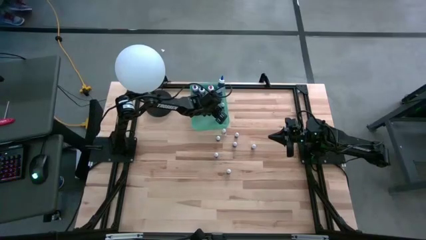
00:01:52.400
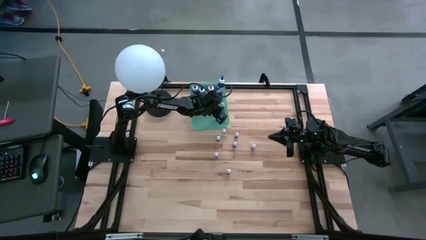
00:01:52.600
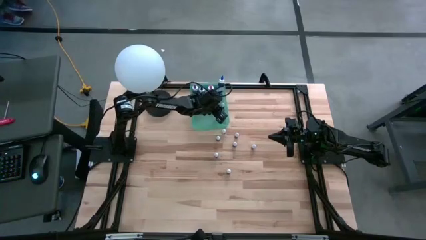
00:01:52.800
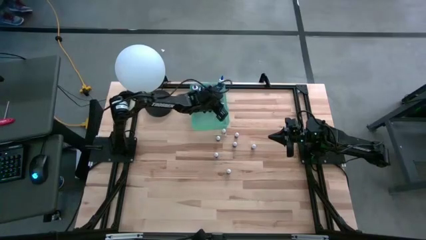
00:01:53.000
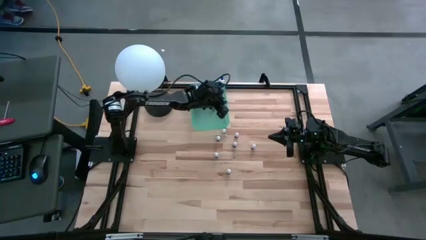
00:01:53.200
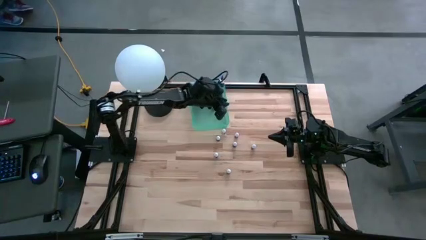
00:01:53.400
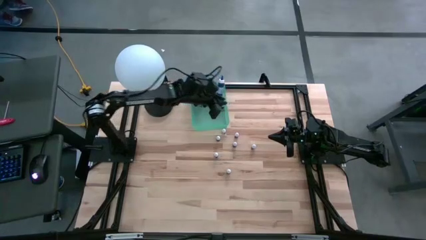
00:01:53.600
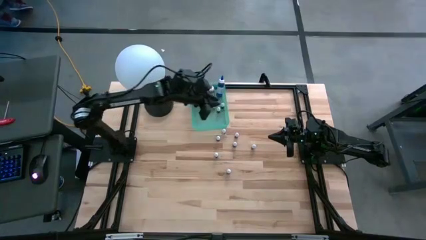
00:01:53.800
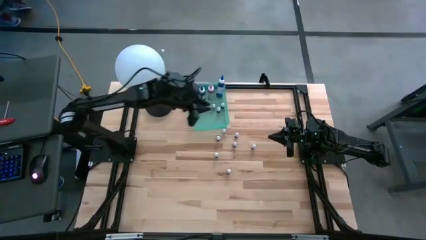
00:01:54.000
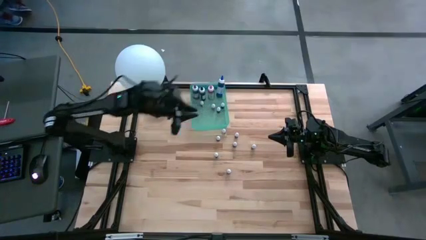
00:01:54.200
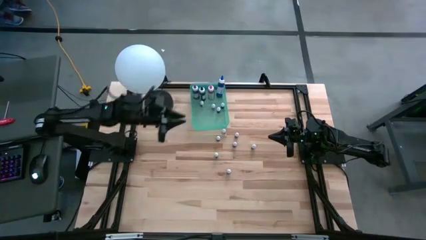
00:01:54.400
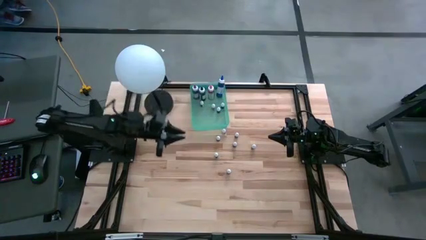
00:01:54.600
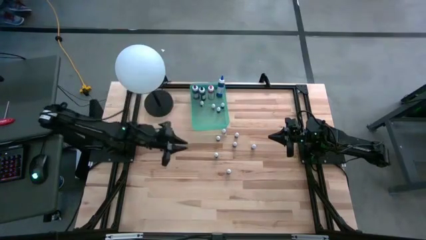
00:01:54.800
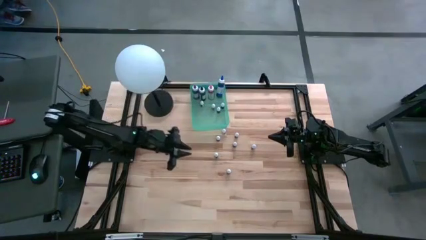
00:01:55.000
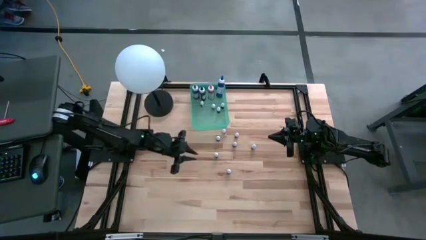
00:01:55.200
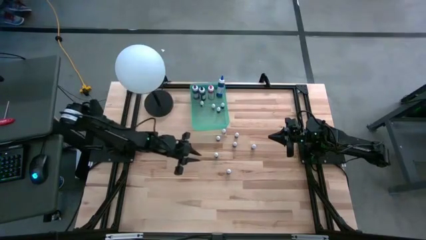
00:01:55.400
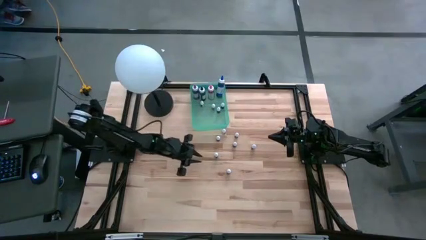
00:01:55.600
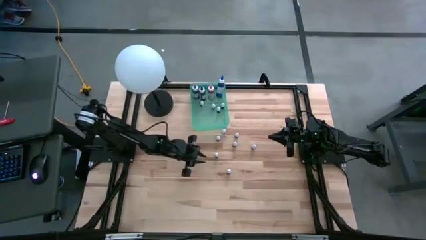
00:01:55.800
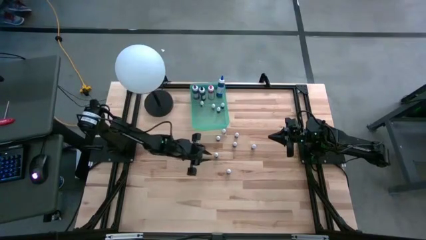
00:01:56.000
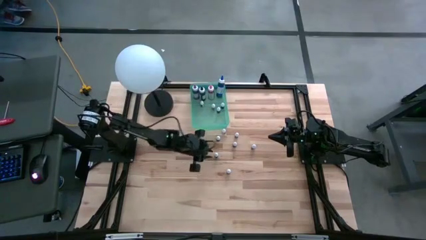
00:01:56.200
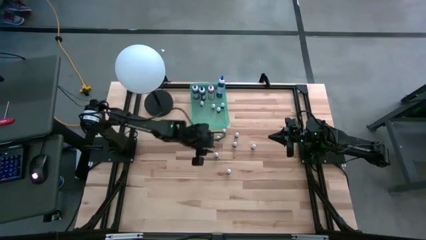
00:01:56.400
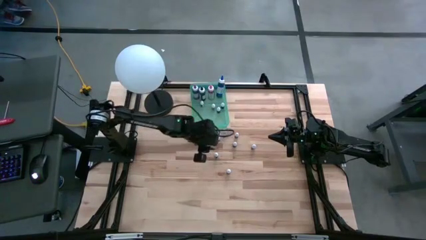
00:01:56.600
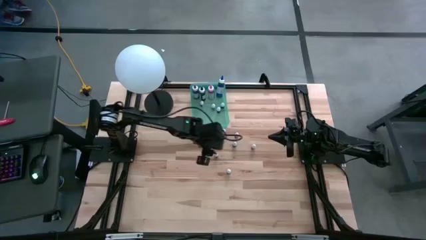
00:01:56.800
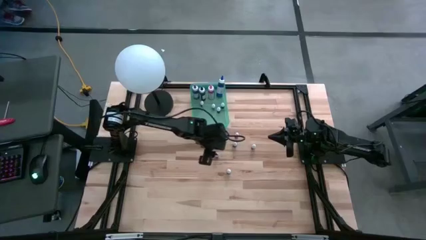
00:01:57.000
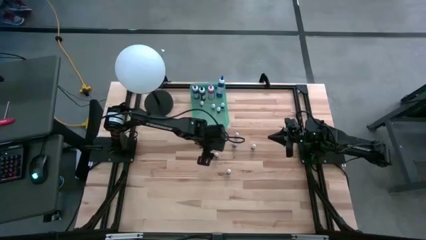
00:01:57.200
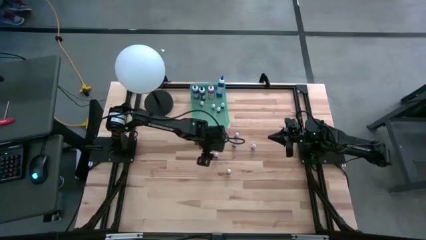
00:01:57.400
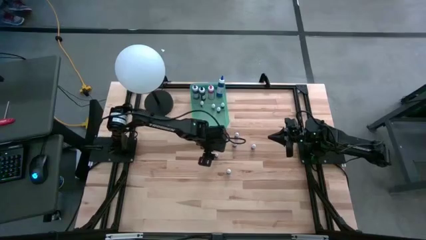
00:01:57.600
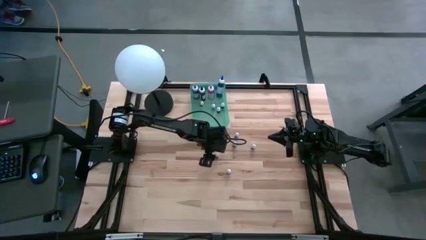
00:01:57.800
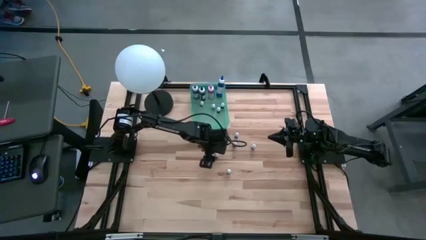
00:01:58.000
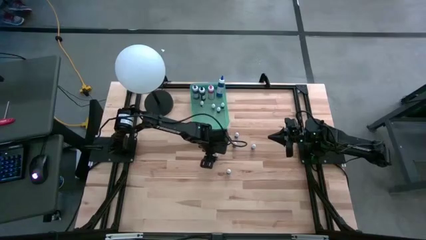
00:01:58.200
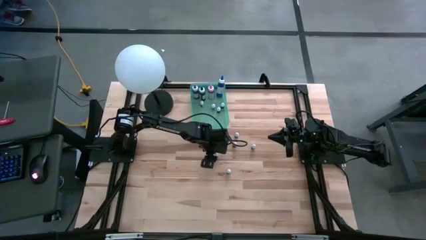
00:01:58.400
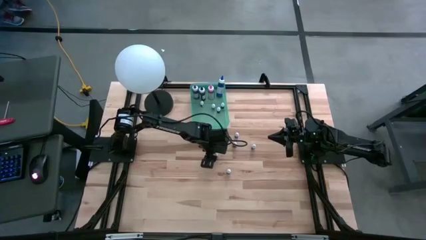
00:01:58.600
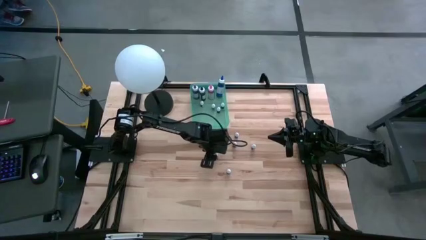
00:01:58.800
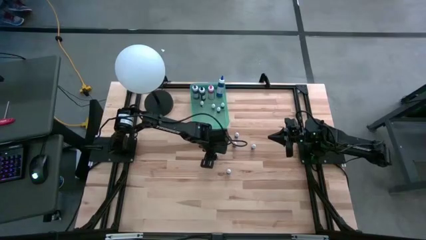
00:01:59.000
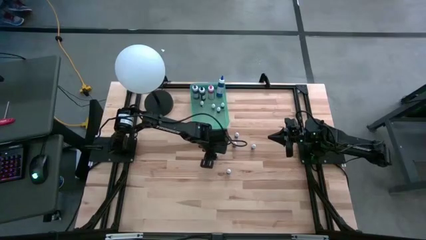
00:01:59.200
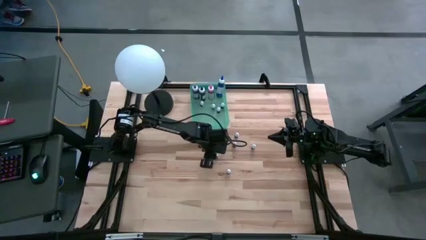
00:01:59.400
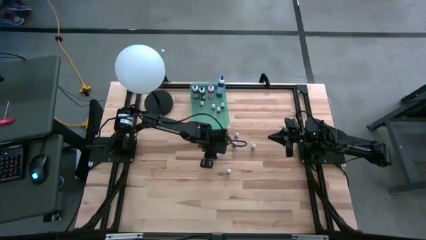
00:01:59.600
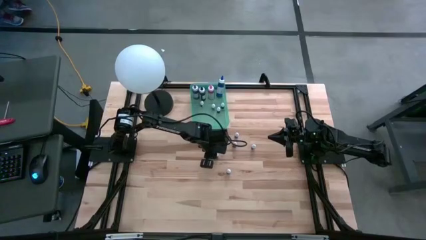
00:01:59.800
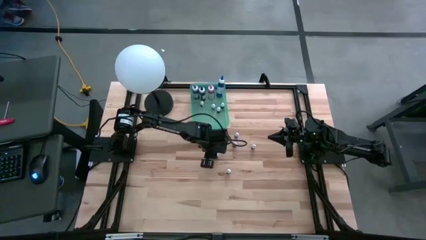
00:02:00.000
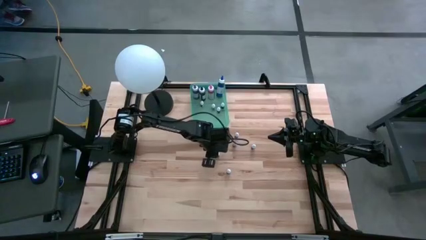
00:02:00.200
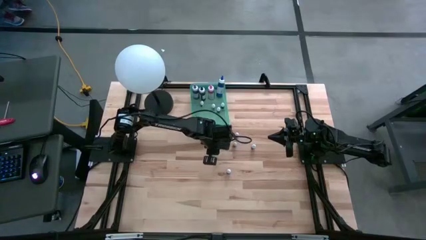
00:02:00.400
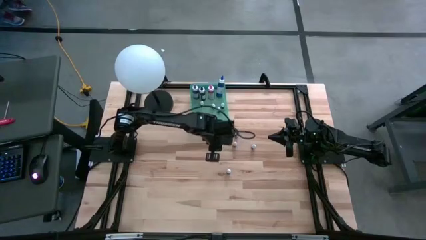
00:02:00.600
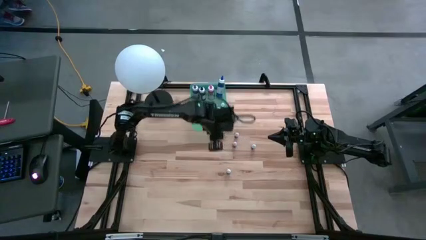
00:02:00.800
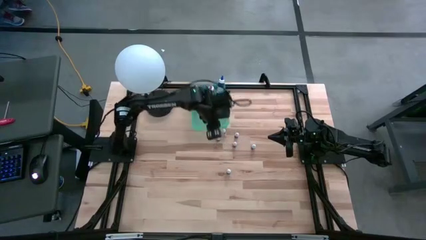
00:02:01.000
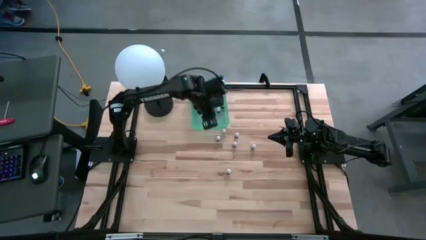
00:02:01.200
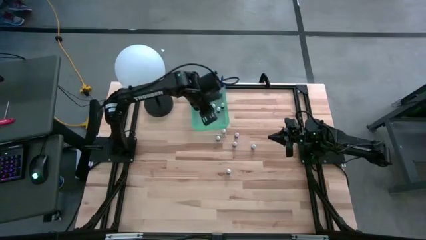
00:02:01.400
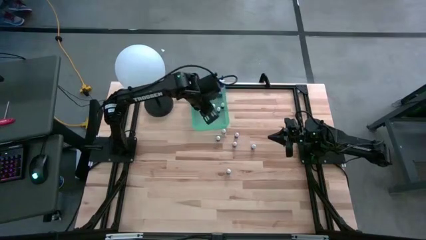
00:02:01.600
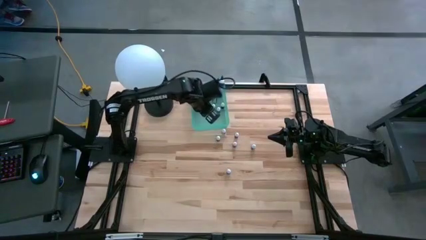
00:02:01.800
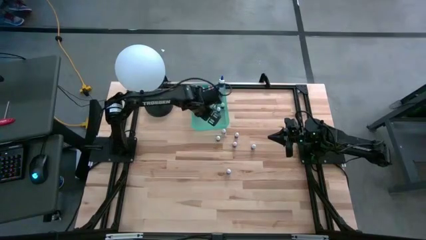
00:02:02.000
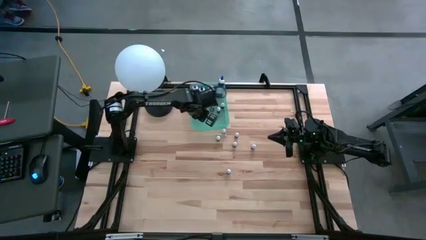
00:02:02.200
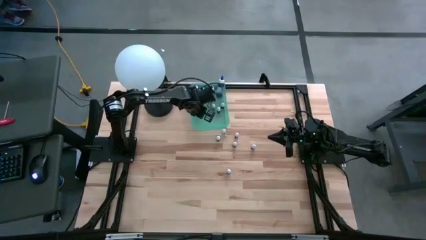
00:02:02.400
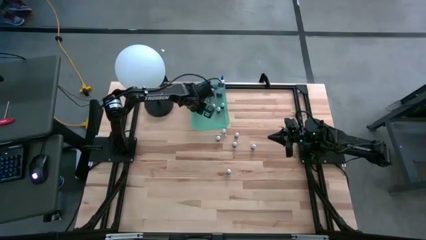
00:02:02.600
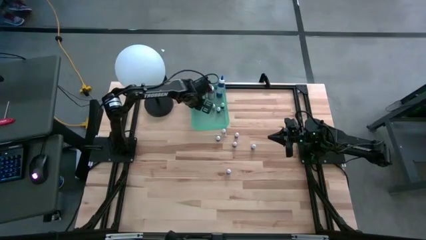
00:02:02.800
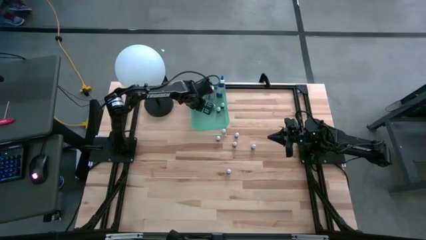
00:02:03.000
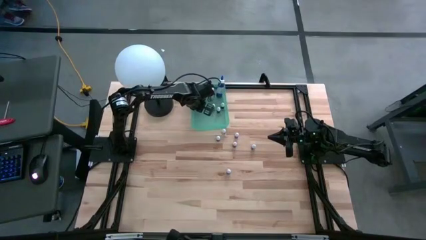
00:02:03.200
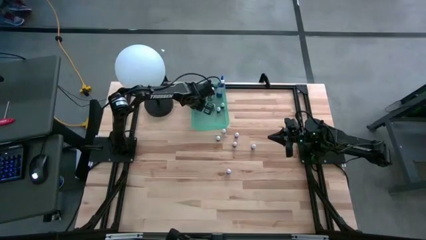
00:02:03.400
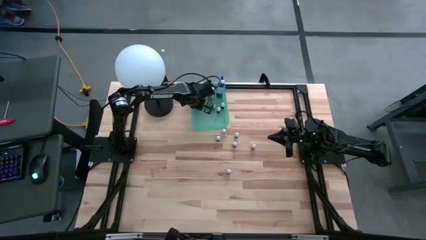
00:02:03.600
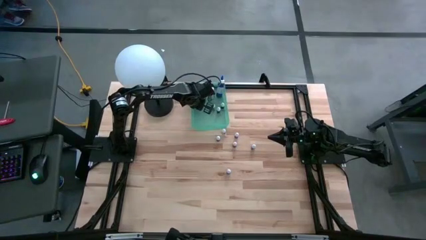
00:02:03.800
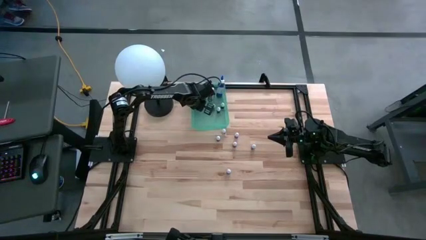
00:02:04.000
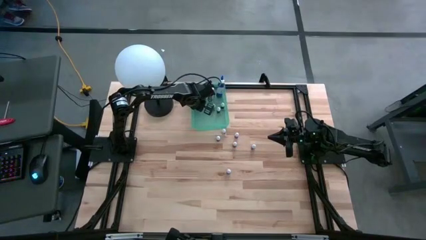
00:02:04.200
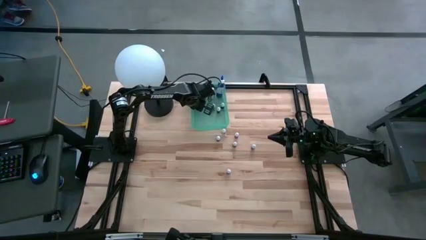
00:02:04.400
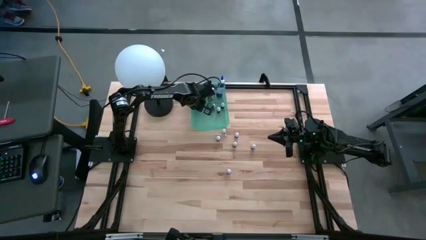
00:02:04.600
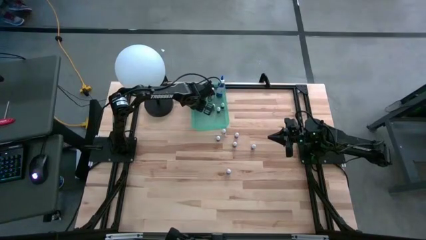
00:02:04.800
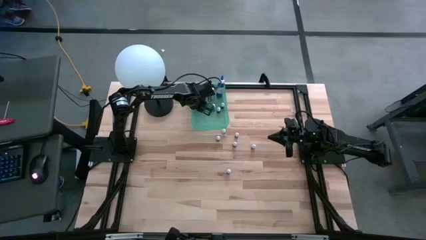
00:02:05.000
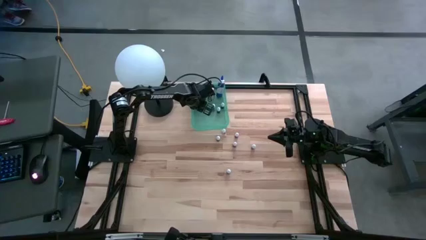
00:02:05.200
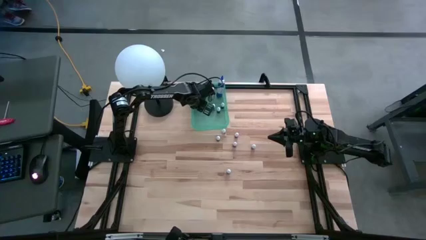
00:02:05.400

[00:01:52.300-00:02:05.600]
Task: Pick & Place food coloring
Put the small red food coloring bottle into the blue bin

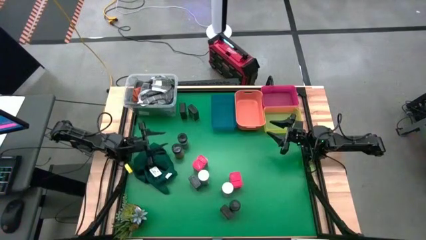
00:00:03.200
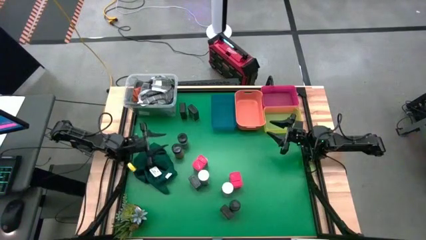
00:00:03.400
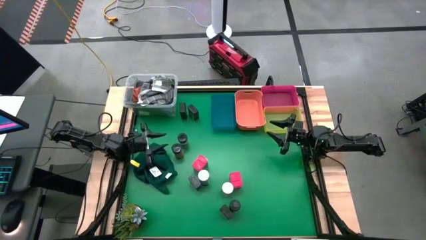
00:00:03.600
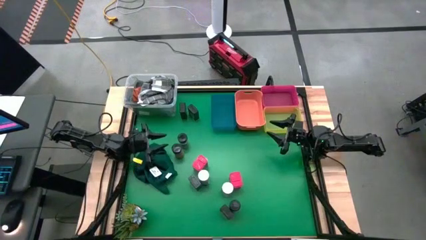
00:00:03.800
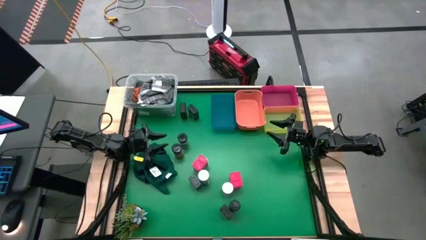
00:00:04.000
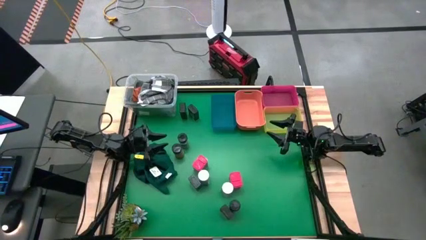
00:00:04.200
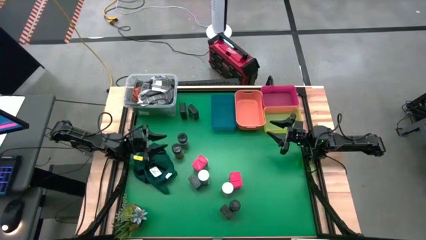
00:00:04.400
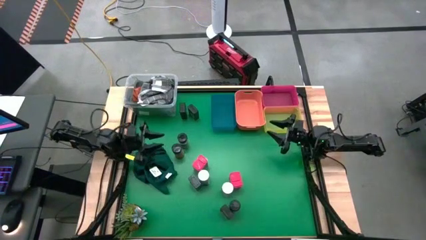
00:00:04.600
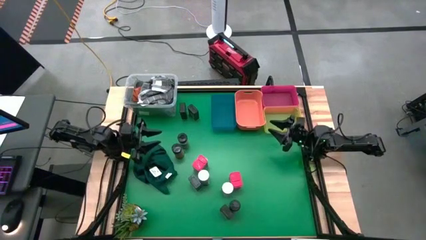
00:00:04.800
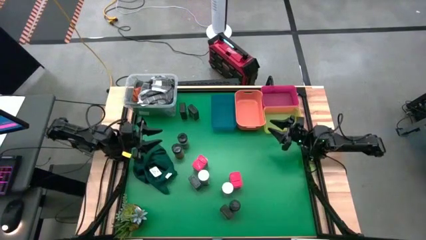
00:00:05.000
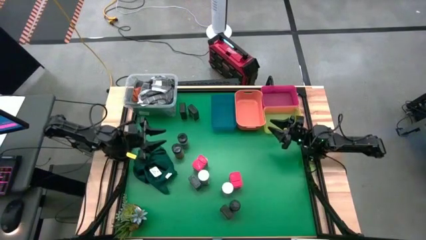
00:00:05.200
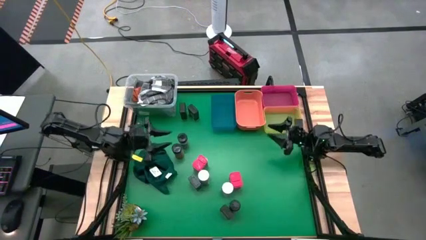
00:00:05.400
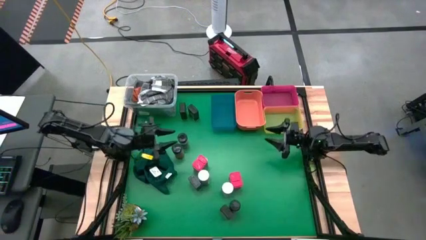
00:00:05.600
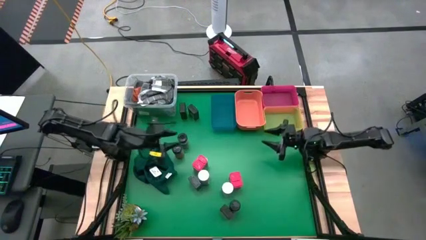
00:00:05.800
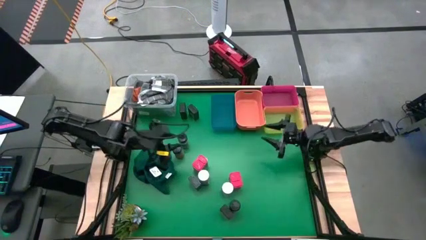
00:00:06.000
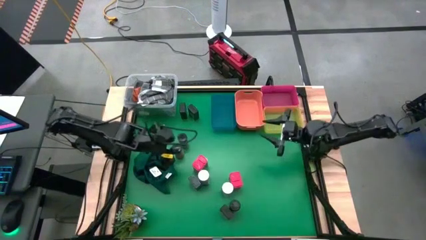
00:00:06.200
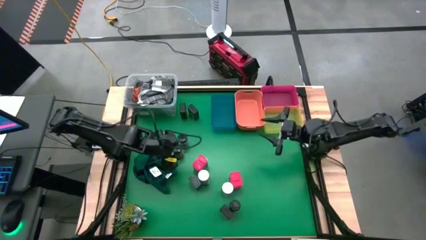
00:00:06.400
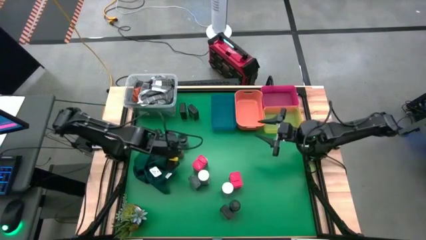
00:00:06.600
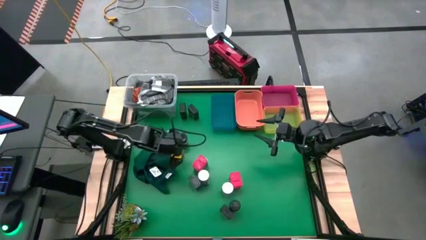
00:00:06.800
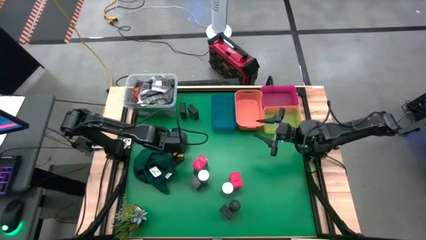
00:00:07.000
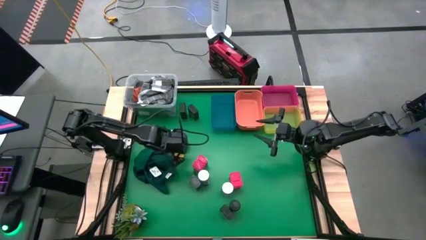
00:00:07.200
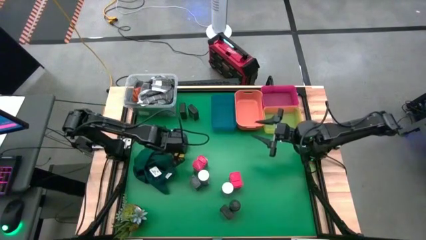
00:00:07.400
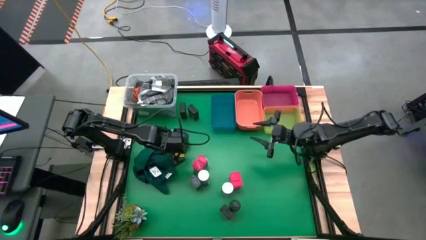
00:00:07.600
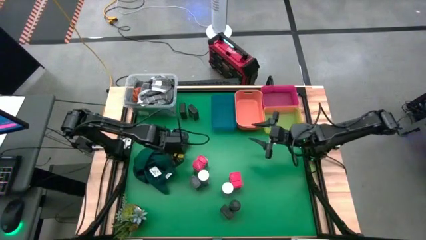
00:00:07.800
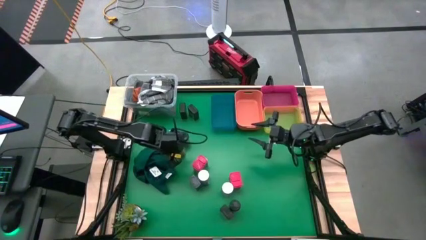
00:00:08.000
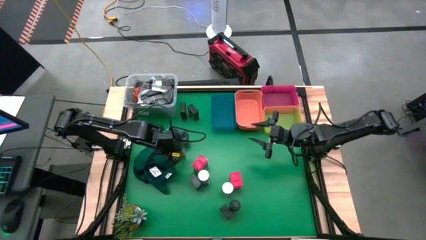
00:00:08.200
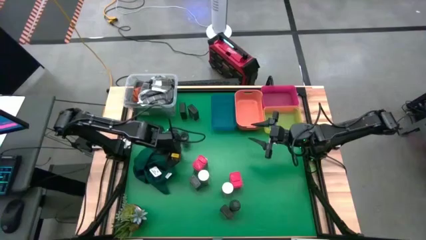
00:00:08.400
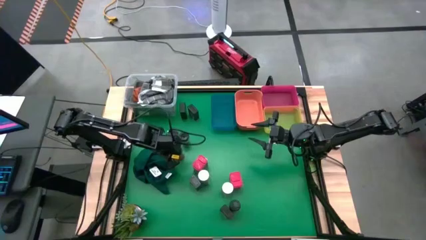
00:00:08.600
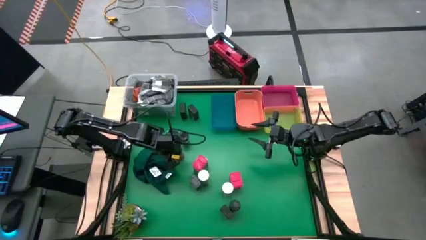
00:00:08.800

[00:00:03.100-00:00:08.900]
Task: Sort spices by type
Put the middle black seasoning bottle into the pink bin
